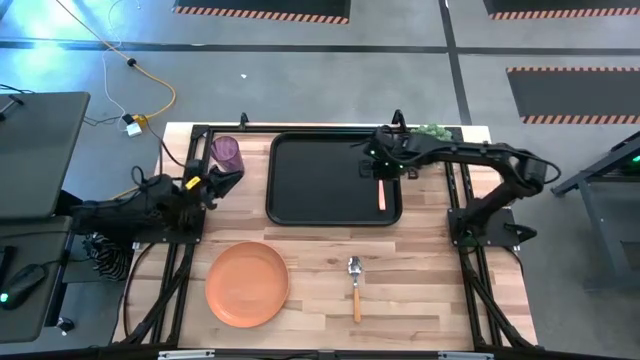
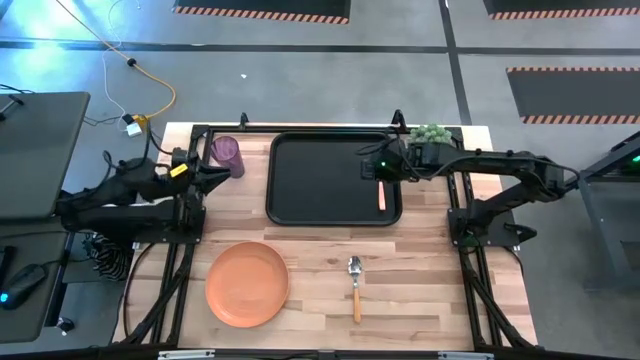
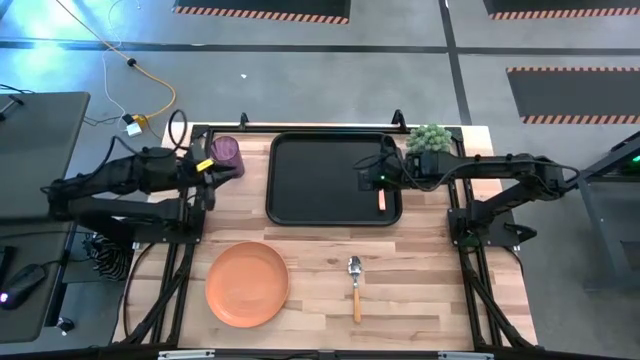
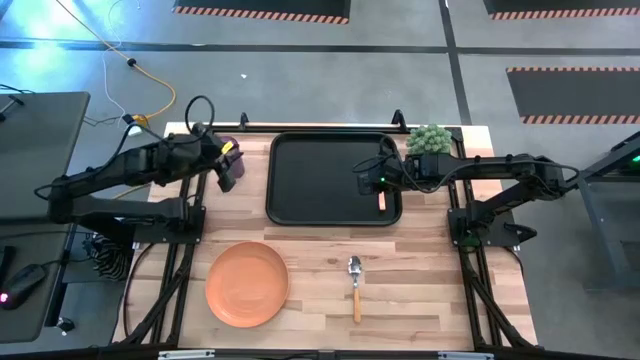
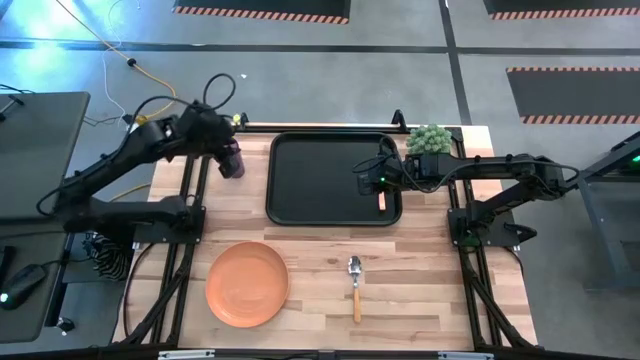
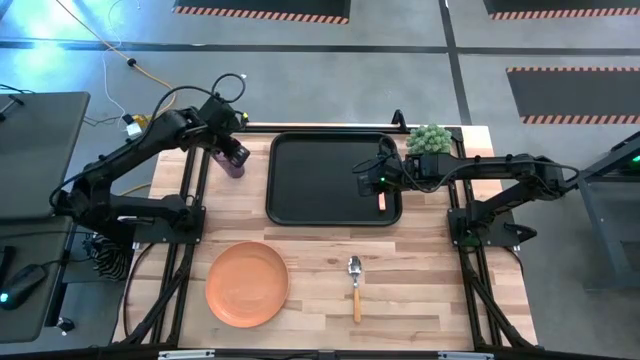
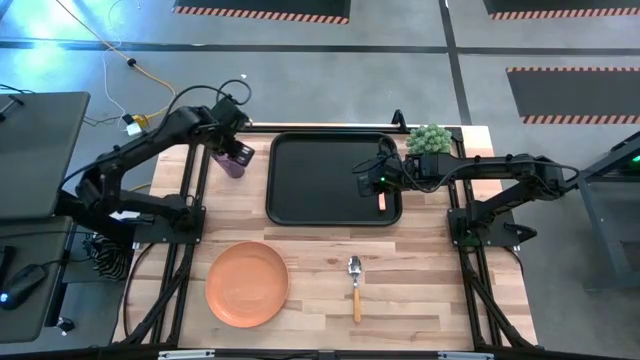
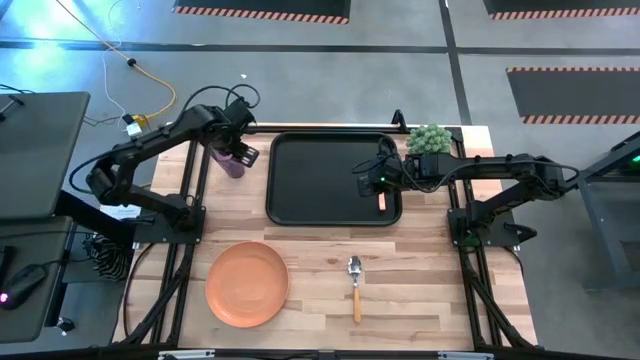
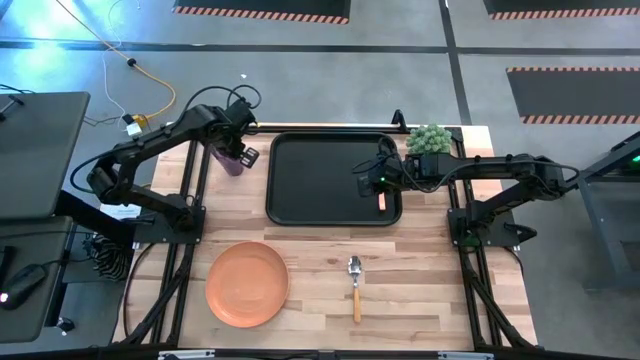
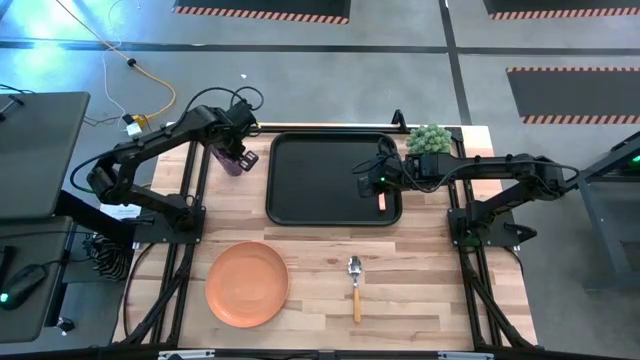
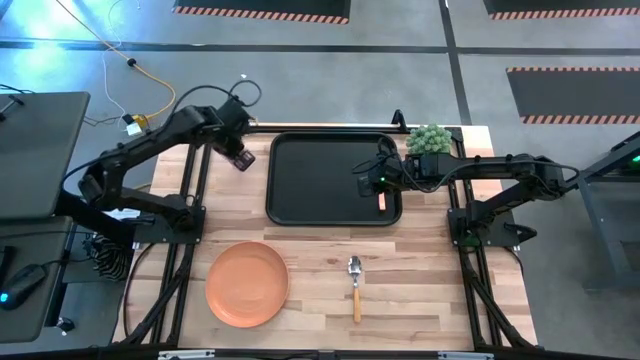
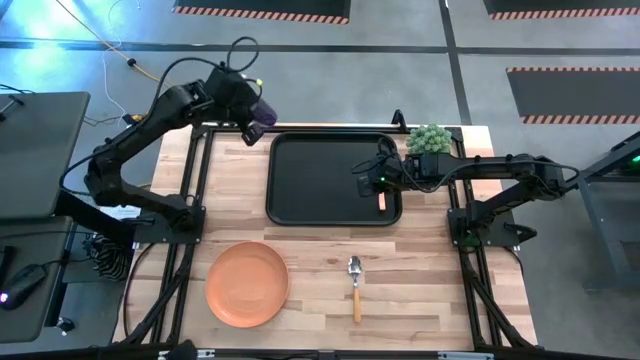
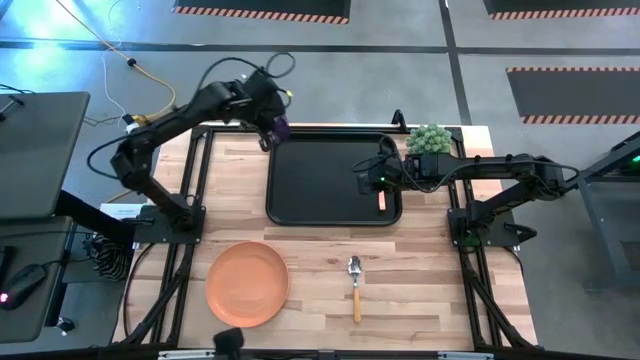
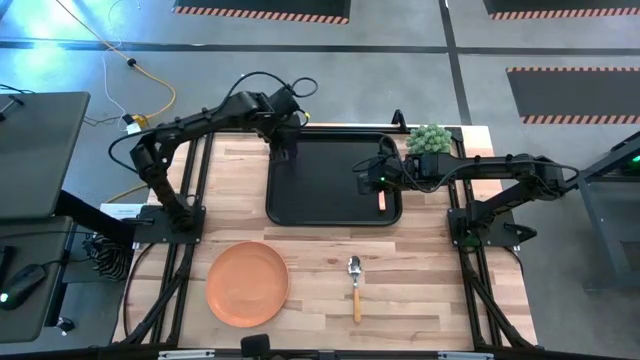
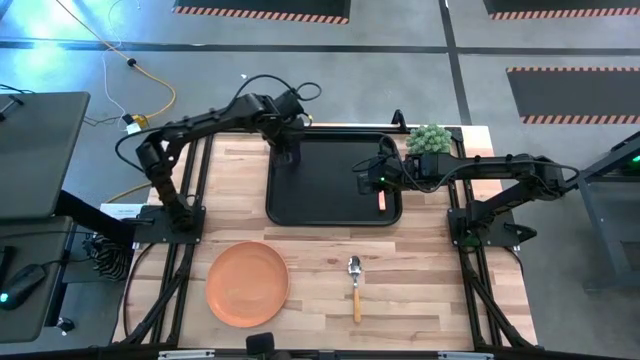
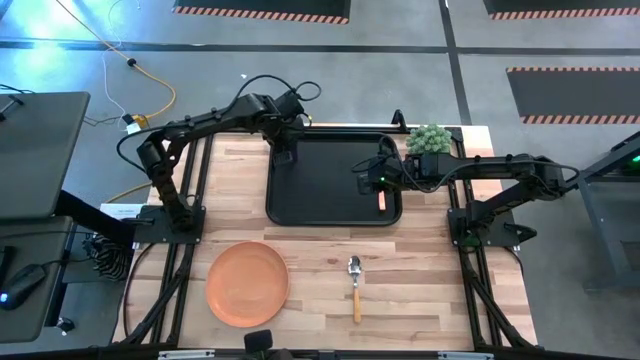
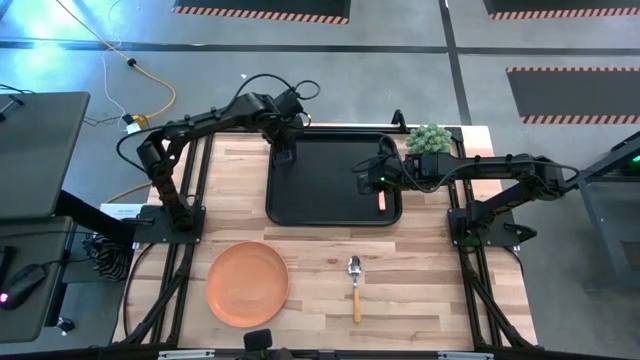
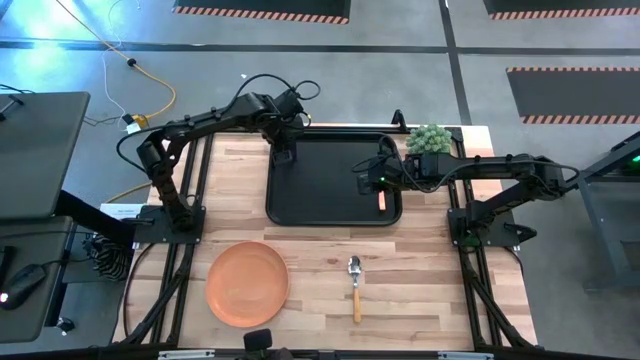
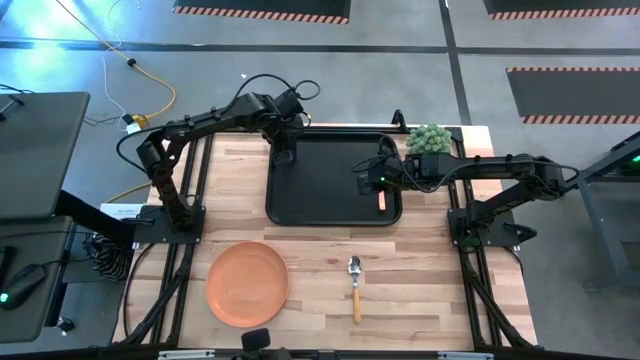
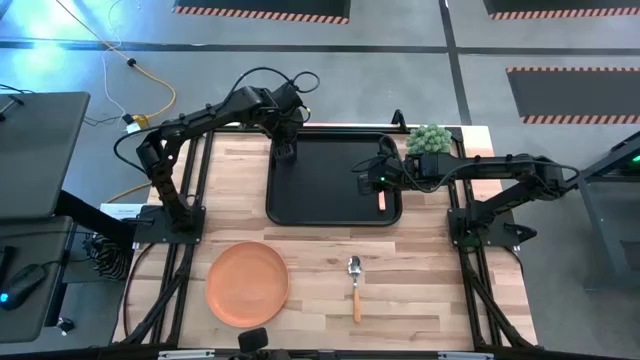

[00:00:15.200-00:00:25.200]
Task: Pick and place plate/cup/fork/spoon on tray
Put the purple cup on the tray

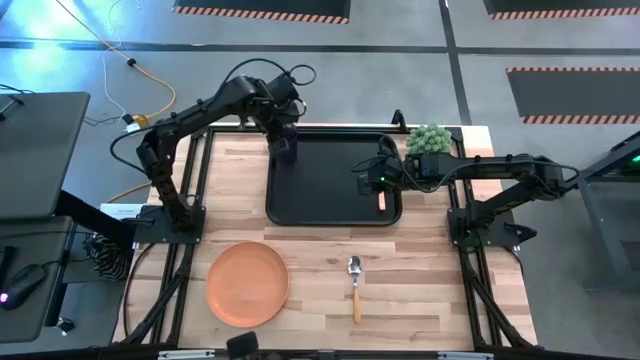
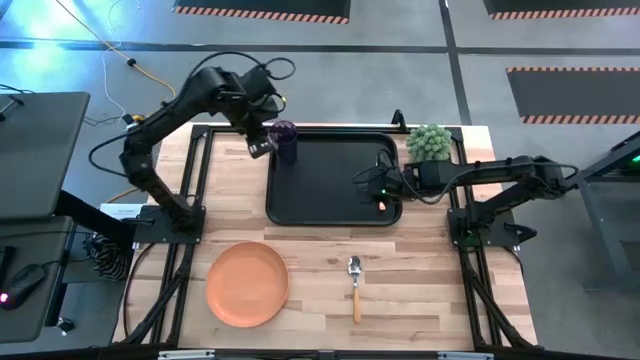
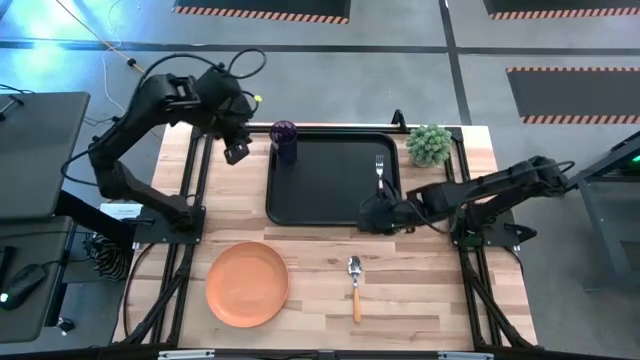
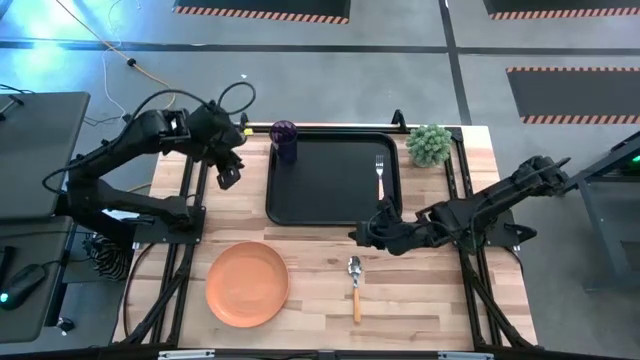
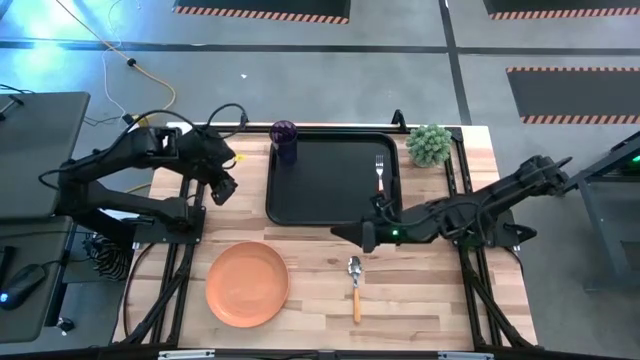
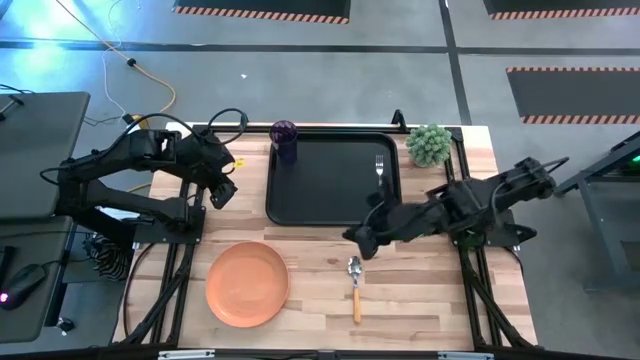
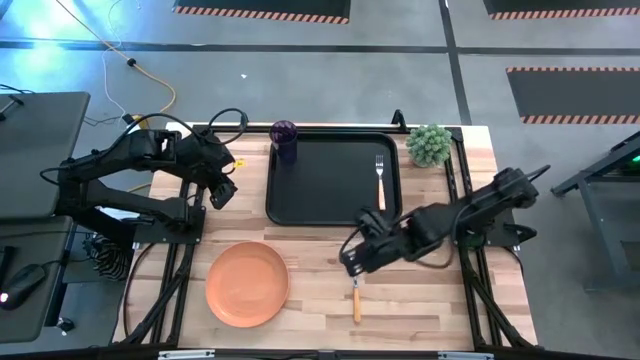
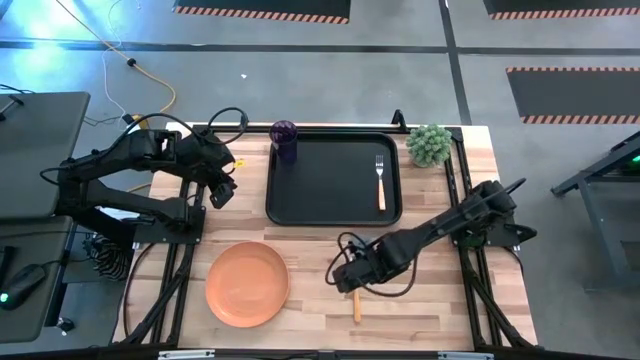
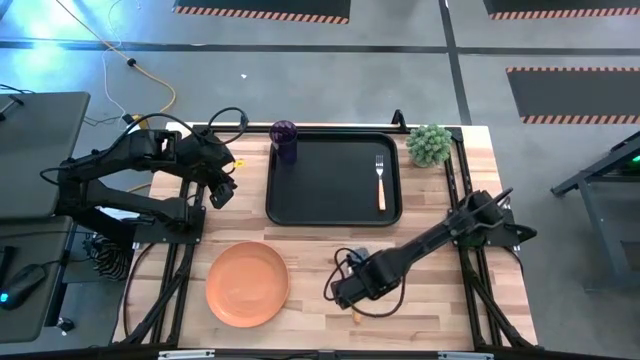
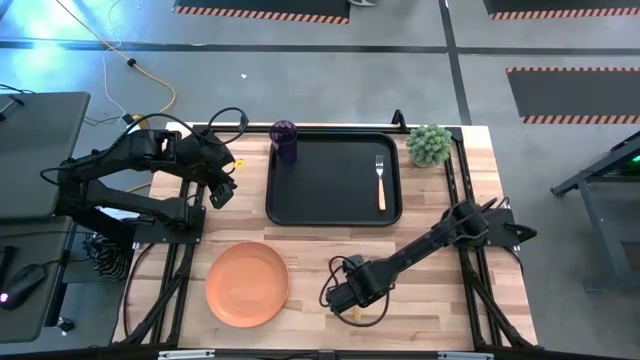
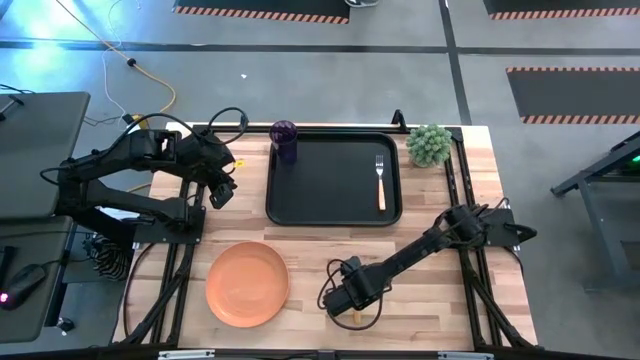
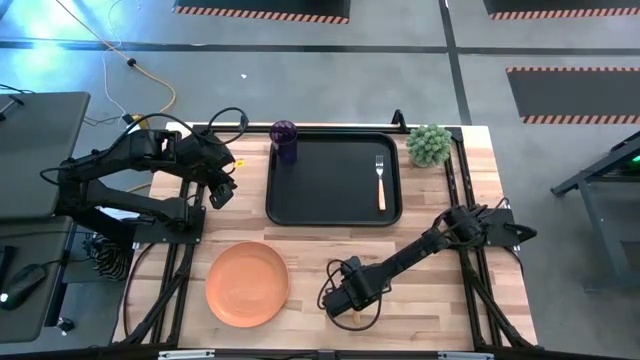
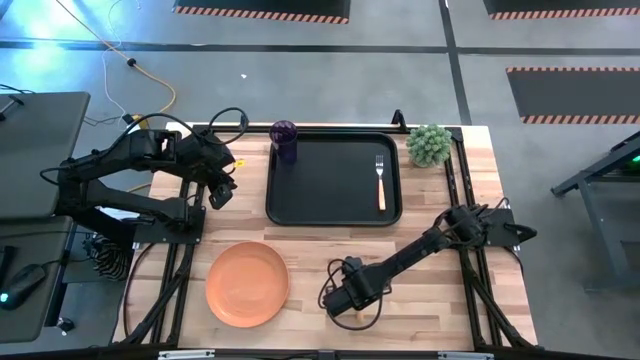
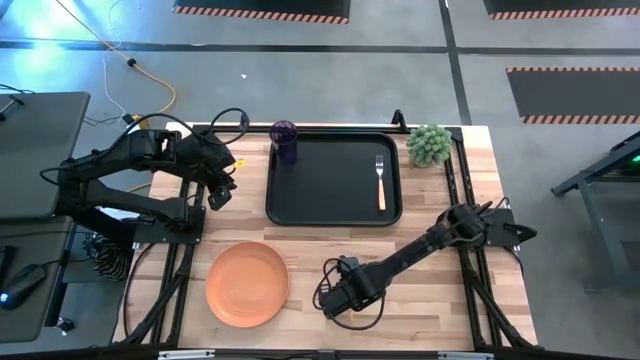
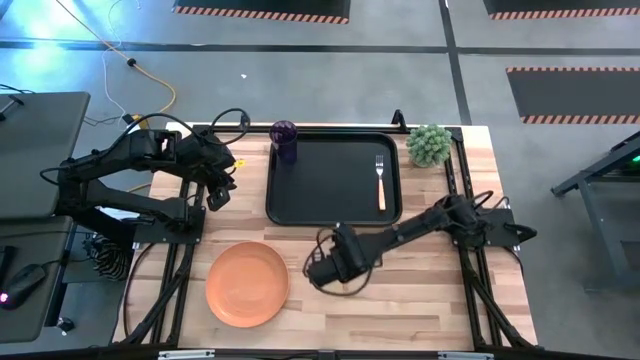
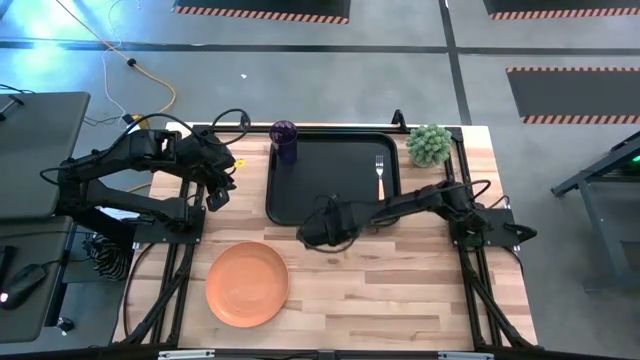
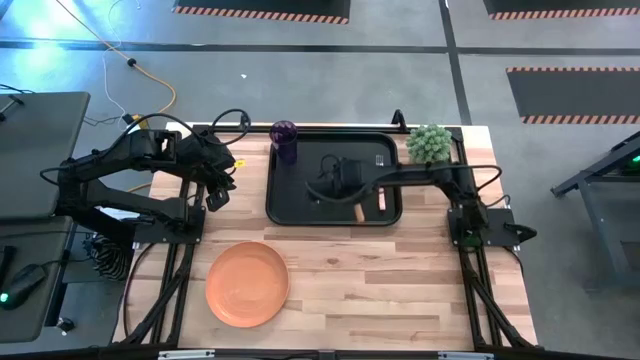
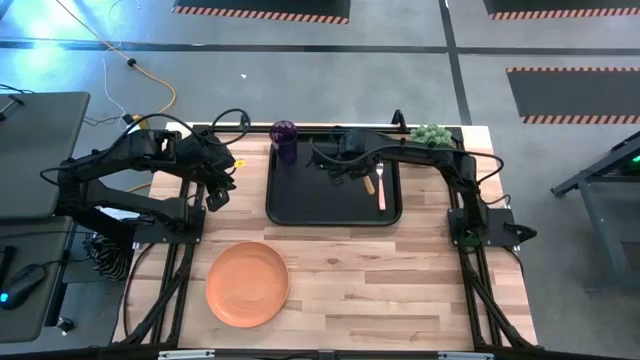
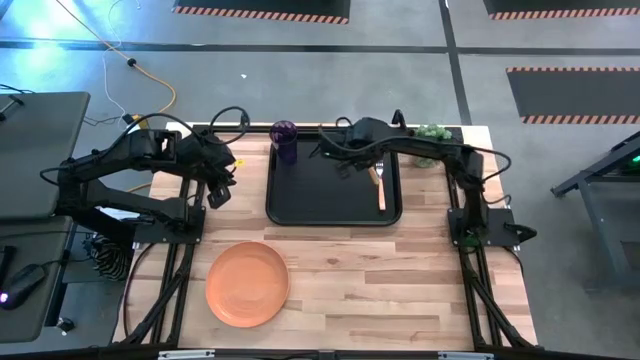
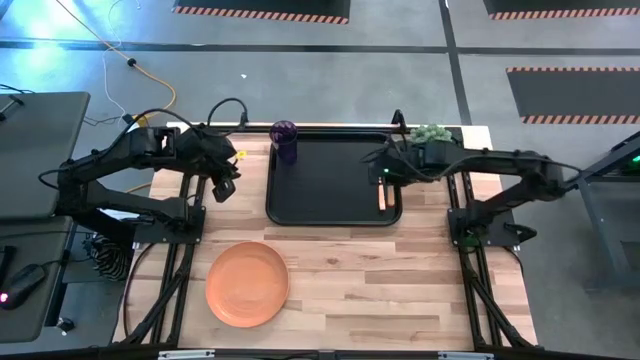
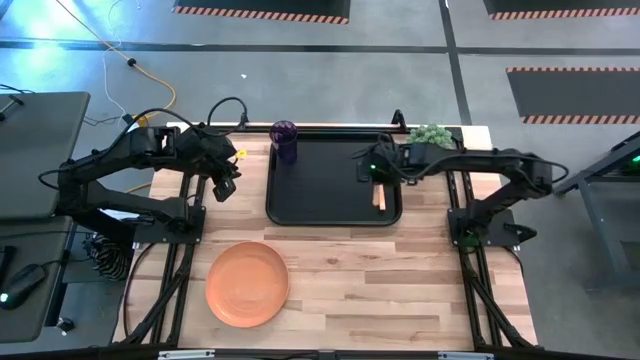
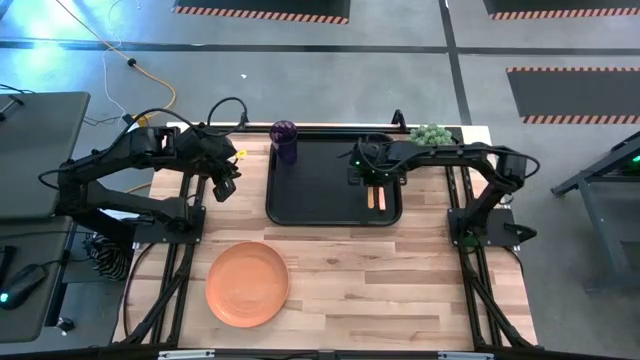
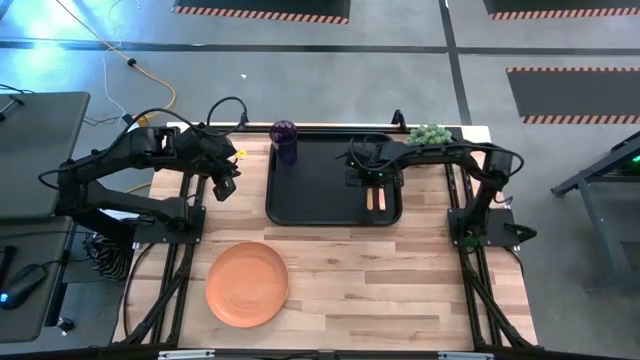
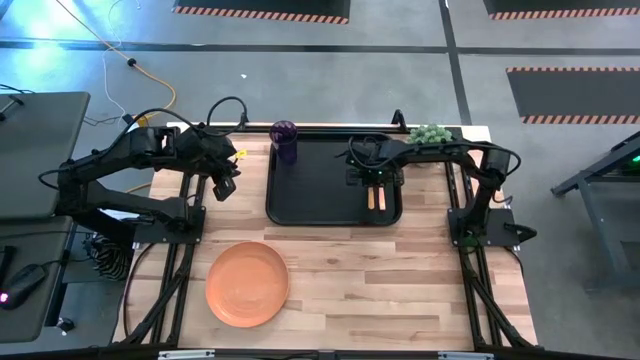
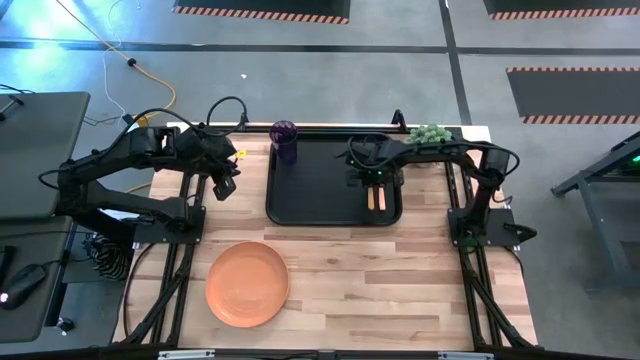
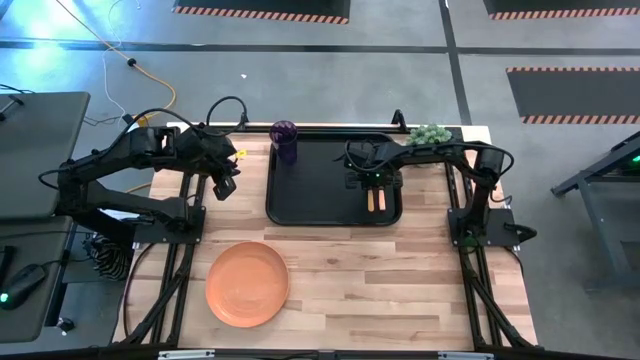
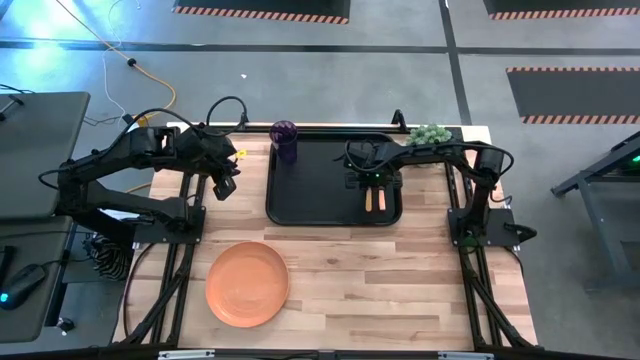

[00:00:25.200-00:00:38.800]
Put the brown spoon to the left of the orange fork on the tray
